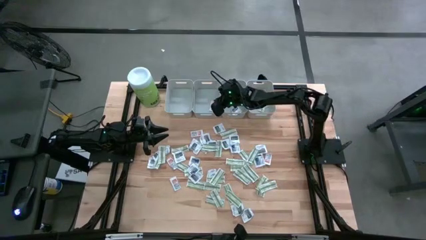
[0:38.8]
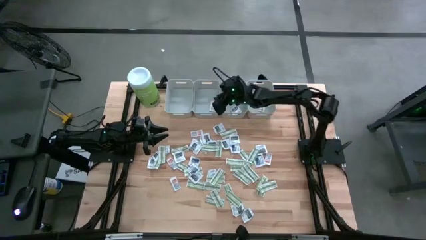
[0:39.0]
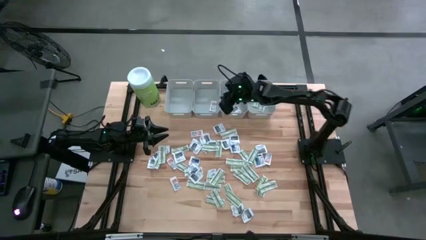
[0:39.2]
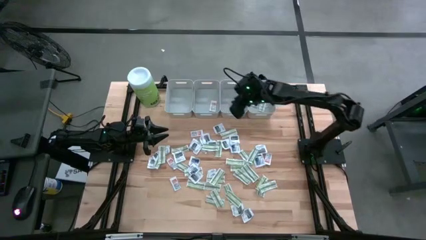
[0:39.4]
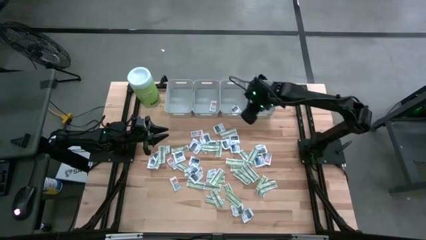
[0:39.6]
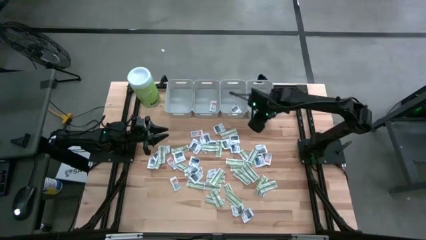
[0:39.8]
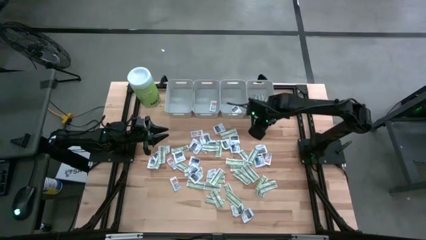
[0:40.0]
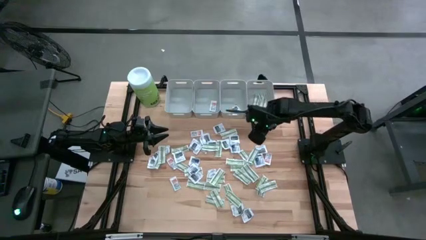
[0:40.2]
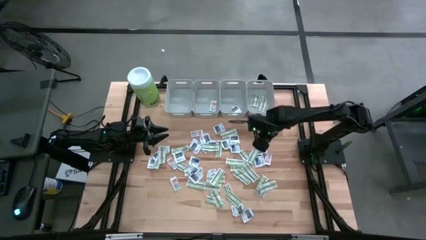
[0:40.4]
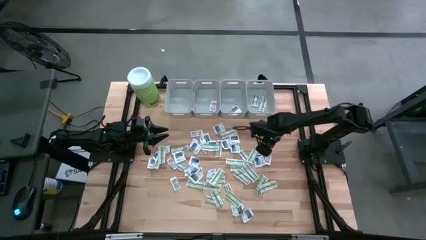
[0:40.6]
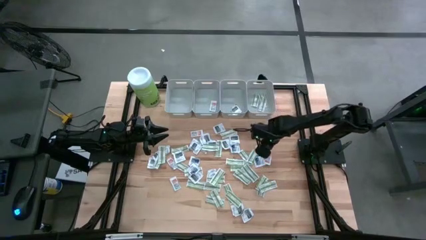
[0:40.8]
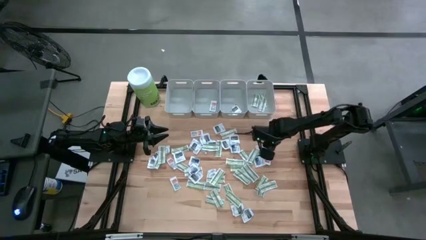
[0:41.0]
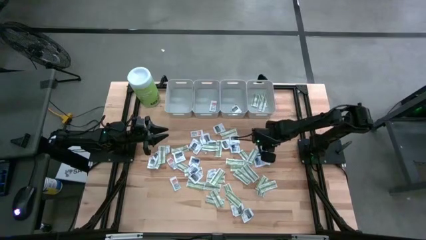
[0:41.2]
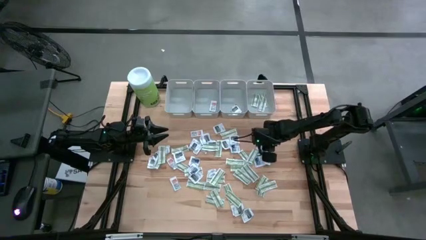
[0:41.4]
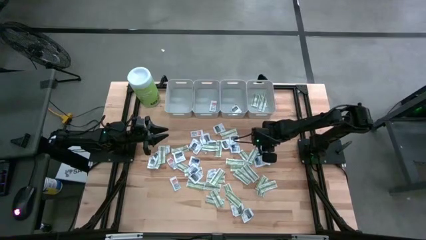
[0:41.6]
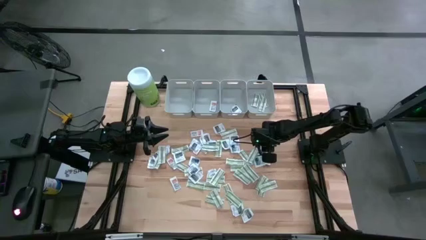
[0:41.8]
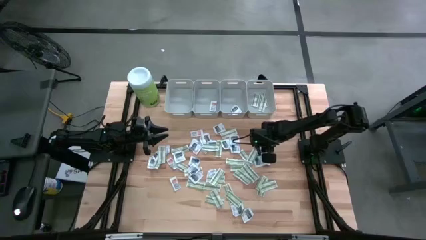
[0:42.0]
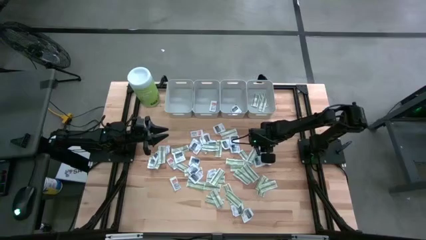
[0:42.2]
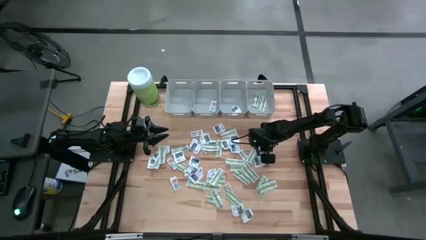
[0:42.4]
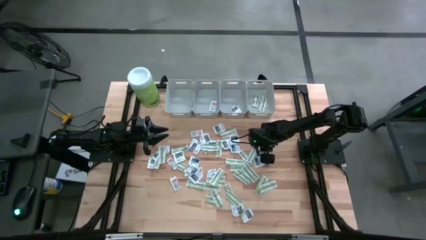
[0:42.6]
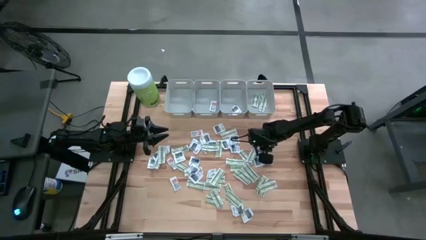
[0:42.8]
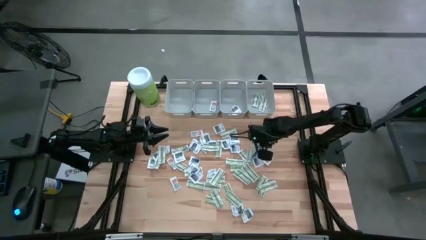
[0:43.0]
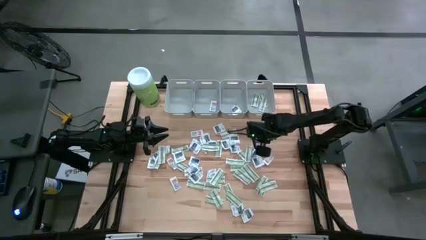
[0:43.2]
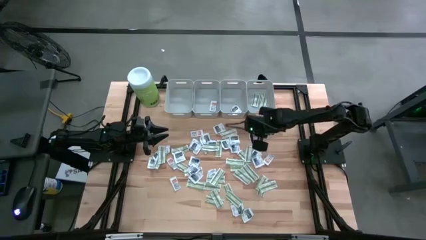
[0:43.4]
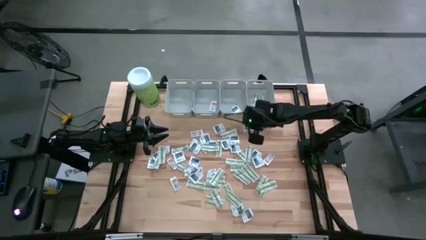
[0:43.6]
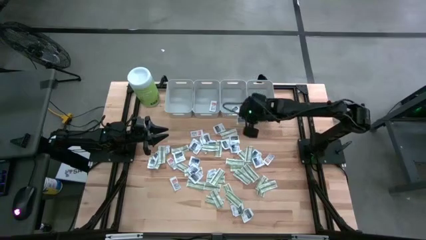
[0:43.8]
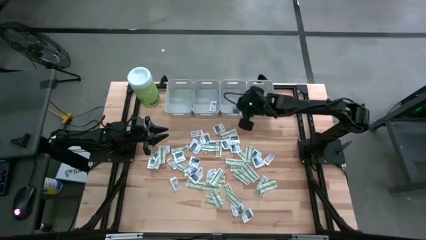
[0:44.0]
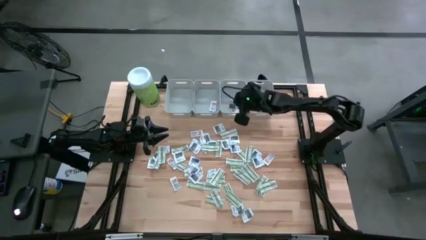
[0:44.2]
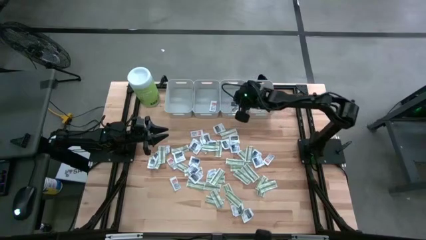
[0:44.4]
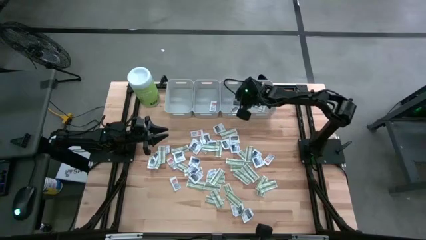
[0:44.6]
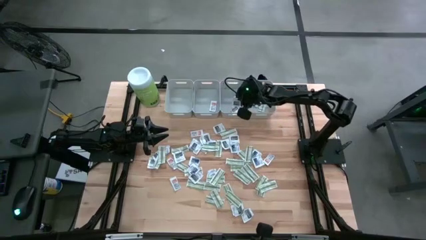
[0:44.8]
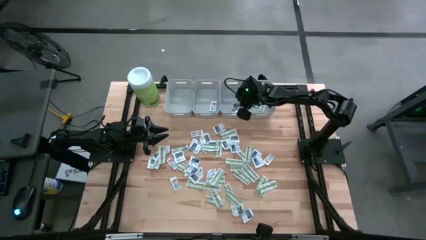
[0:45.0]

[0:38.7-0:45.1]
Task: Pick & Place First Aid Supplies
Put the towelette pack into the middle right gray bin

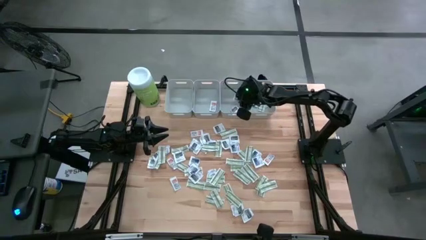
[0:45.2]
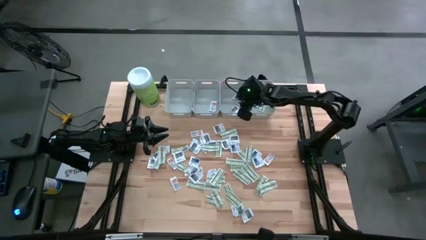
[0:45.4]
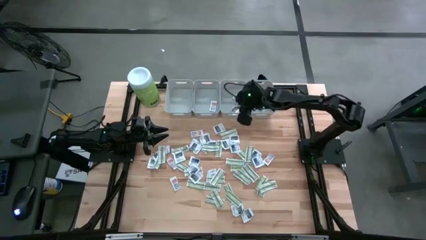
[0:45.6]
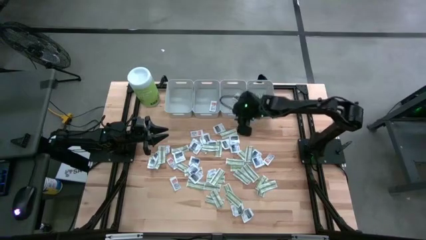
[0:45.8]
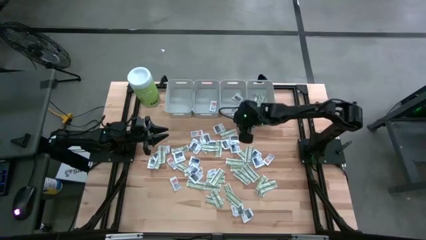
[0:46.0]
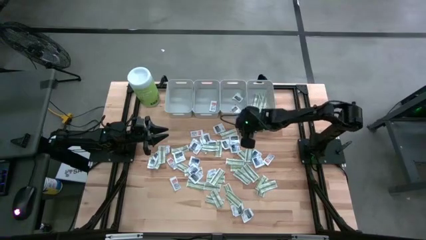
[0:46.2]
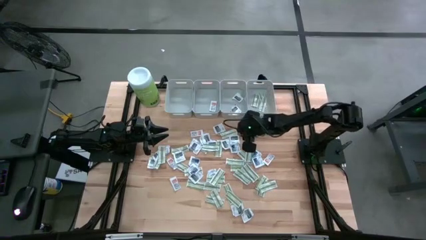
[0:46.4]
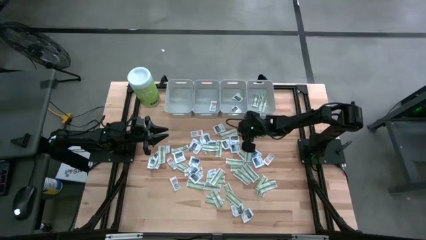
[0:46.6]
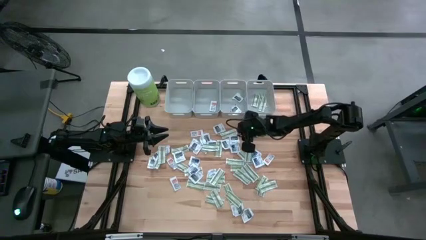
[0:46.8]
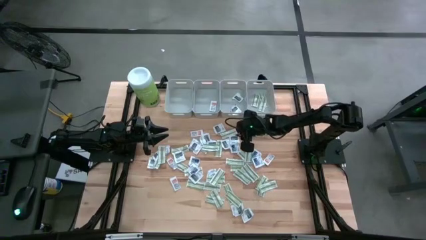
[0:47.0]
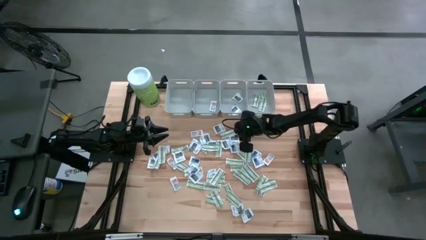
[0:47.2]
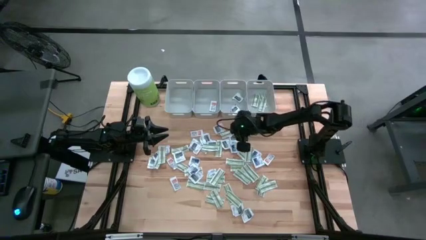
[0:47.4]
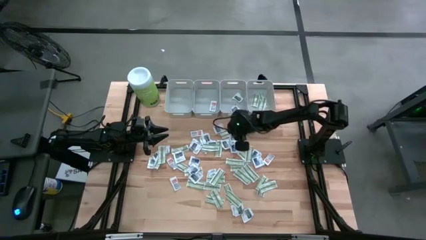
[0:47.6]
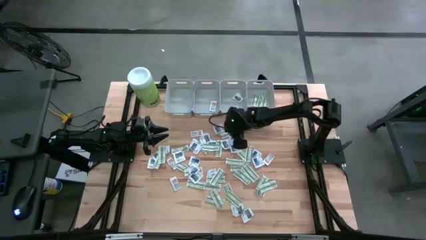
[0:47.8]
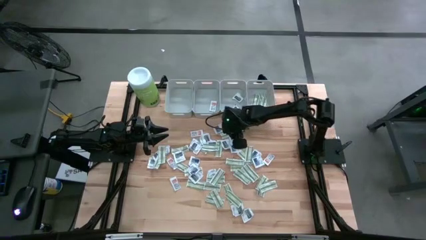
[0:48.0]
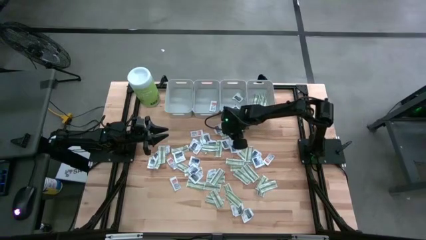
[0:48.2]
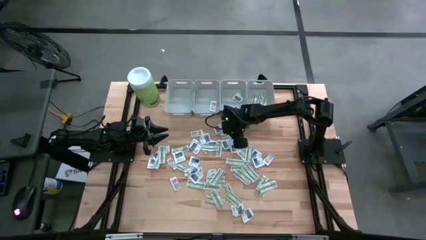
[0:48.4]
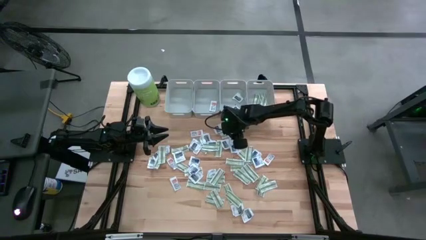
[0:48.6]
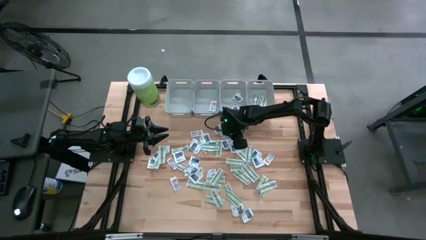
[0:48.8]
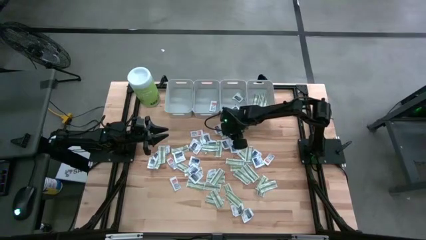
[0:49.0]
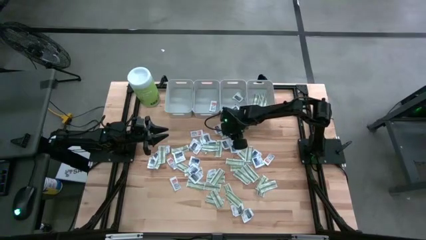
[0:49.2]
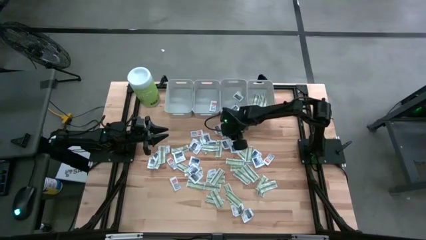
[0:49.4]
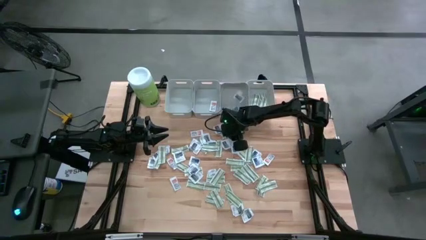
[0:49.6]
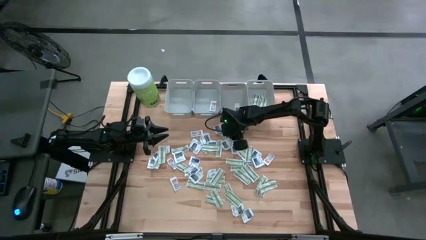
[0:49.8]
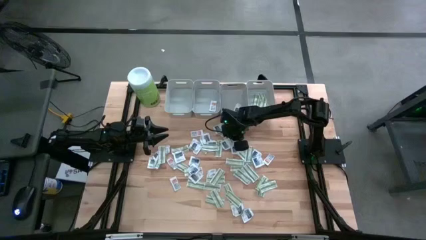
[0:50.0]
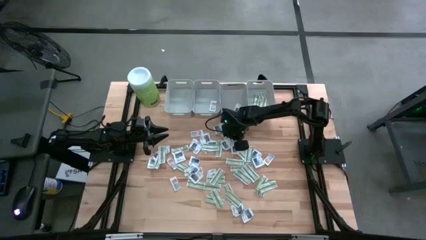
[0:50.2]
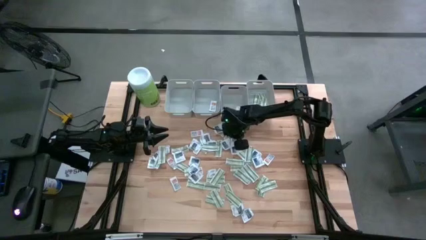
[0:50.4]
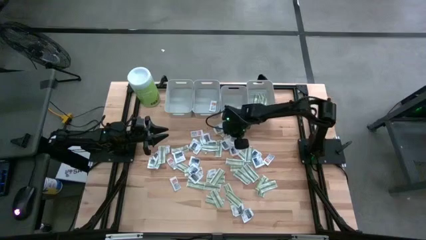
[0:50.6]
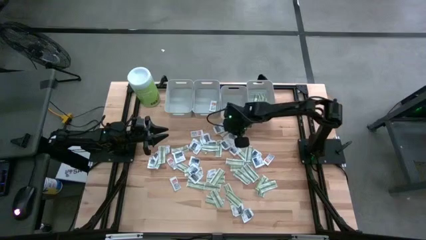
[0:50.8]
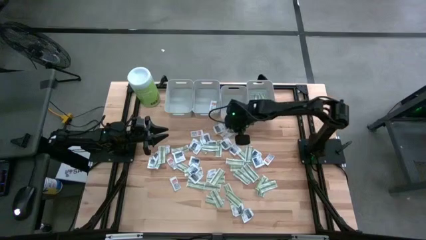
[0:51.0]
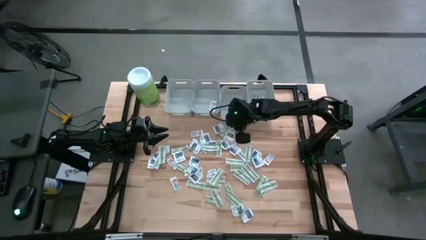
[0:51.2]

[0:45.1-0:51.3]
Put the towelette pack into the middle right gray bin

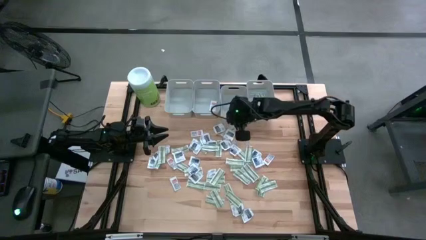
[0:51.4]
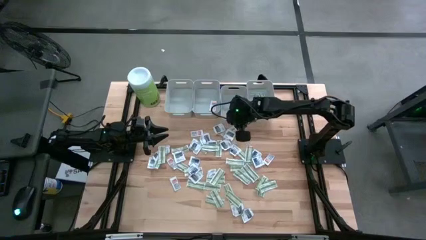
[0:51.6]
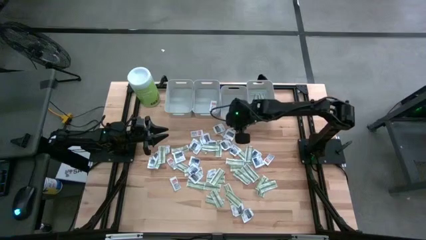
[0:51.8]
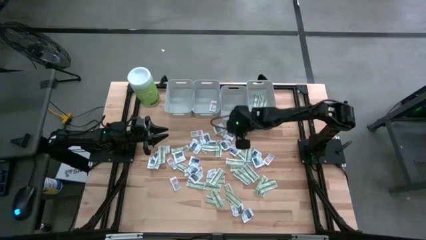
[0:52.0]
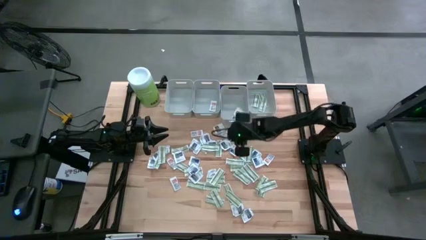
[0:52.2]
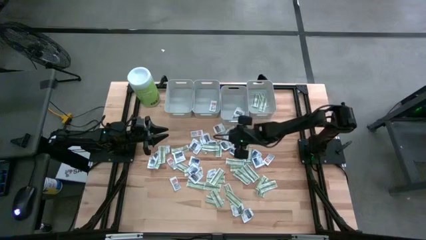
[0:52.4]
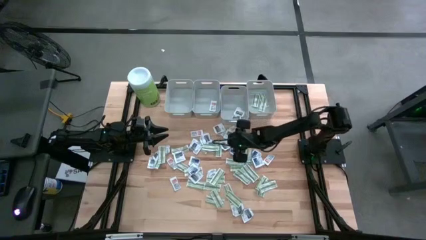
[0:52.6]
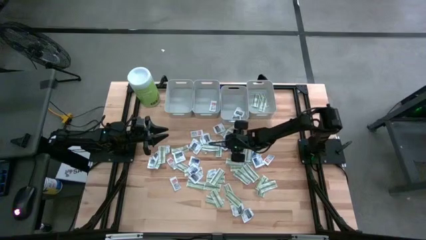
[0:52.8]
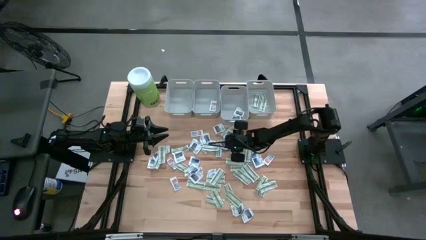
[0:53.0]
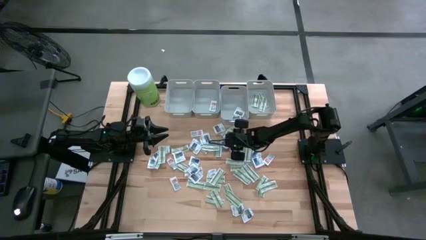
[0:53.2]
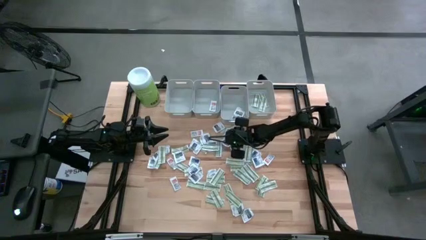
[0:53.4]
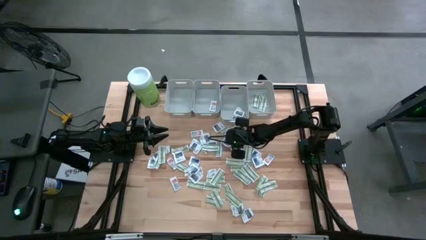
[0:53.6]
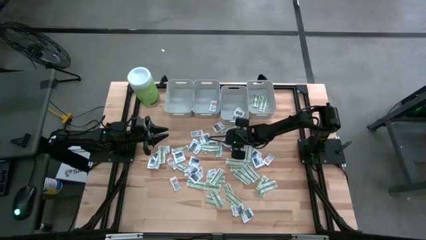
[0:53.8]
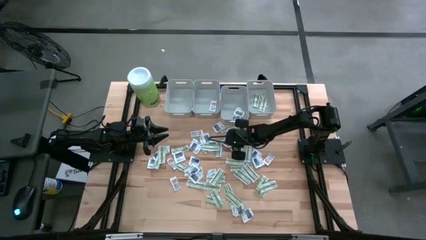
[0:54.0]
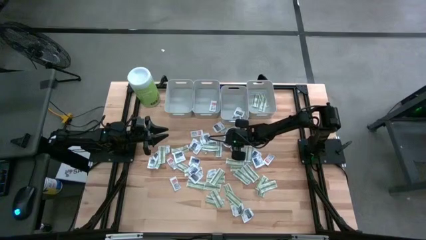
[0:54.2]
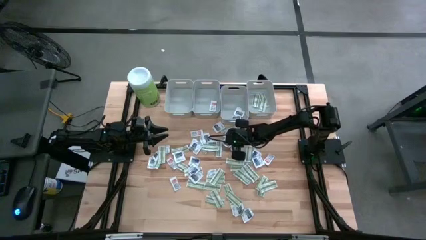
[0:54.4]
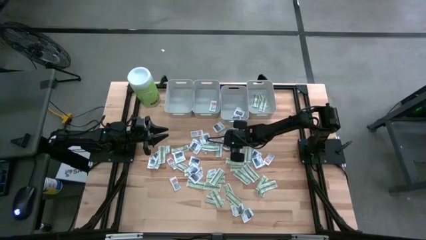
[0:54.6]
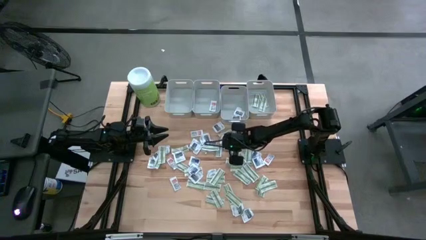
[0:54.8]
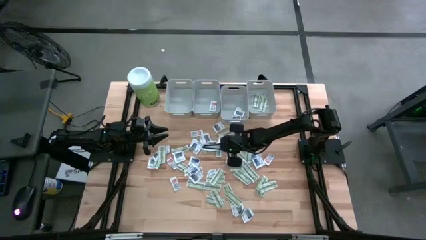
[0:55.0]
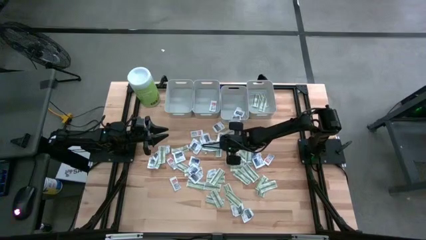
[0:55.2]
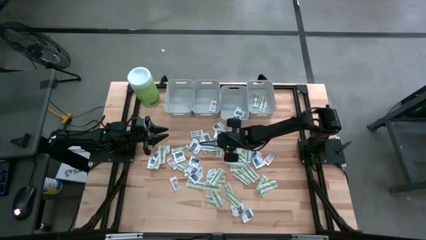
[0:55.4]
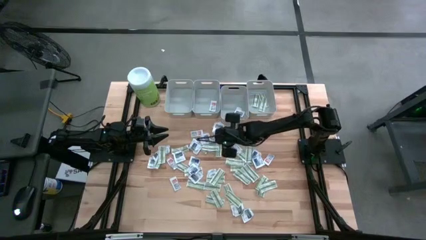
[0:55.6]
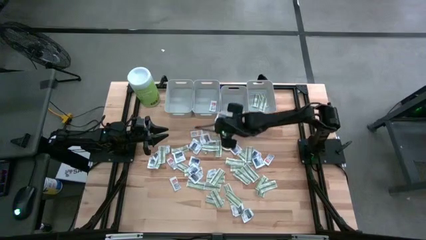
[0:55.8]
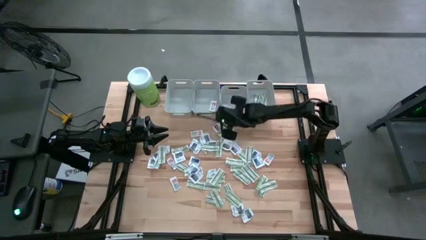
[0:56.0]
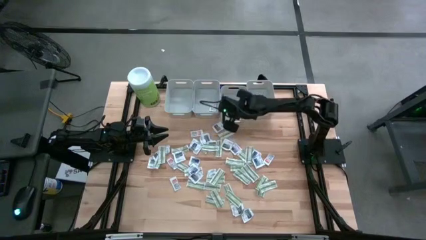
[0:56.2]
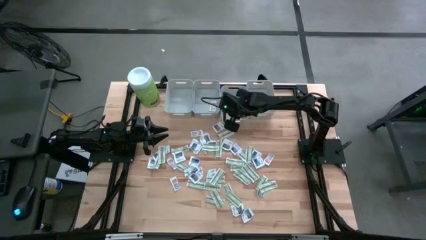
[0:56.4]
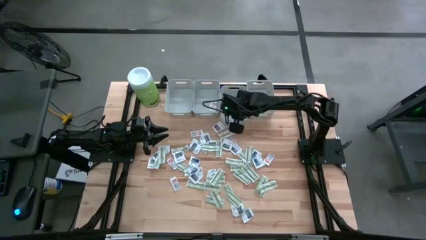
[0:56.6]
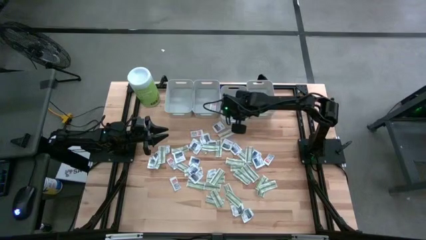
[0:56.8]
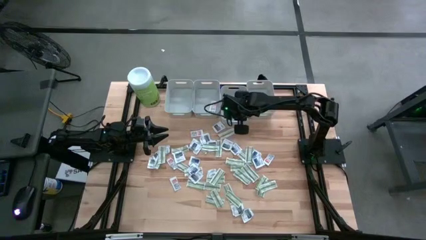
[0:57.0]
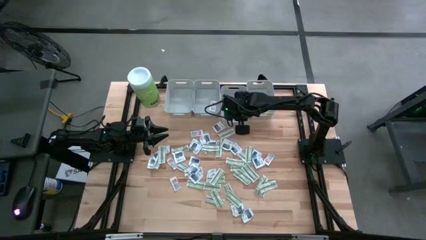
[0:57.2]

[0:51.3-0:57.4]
Put the towelette pack into the middle right gray bin
